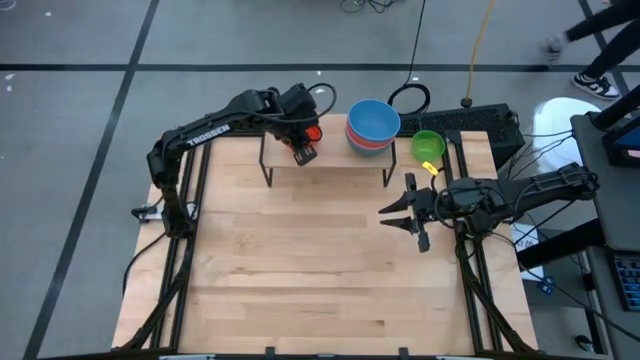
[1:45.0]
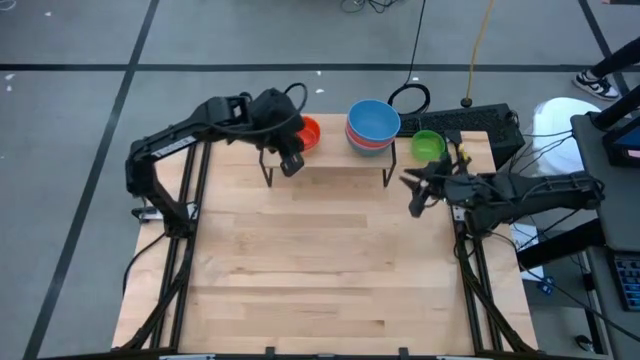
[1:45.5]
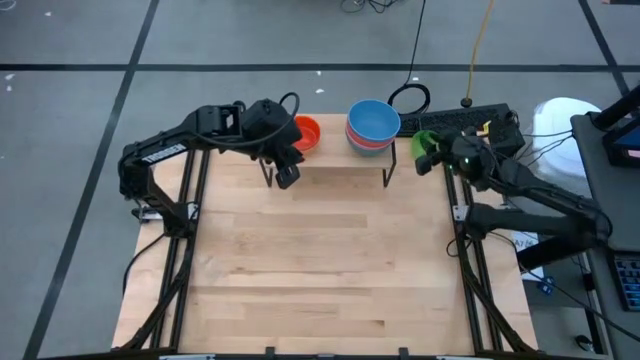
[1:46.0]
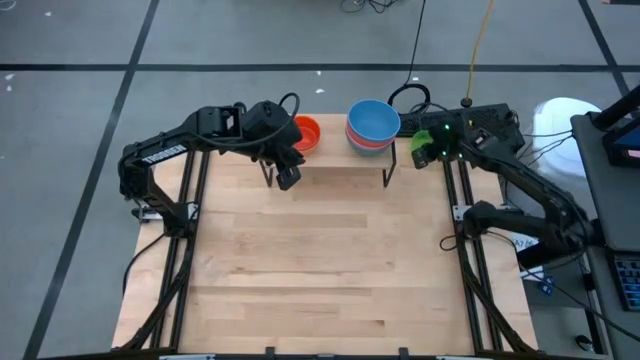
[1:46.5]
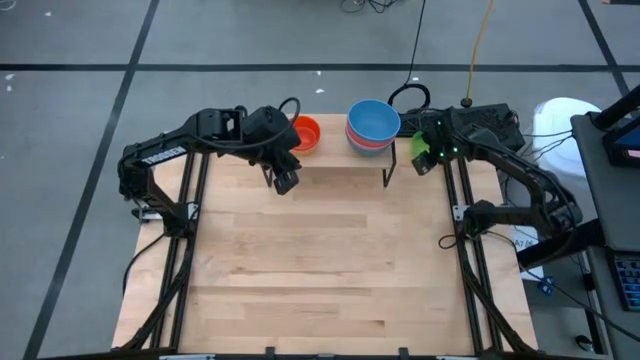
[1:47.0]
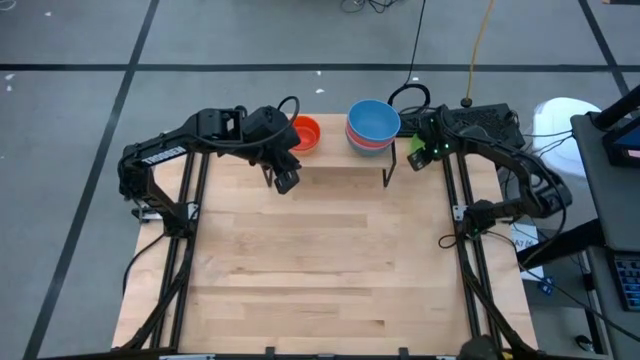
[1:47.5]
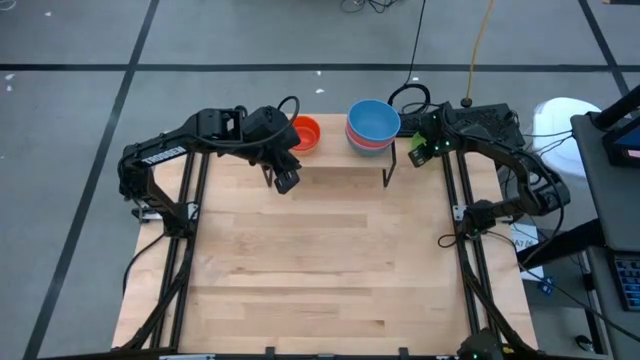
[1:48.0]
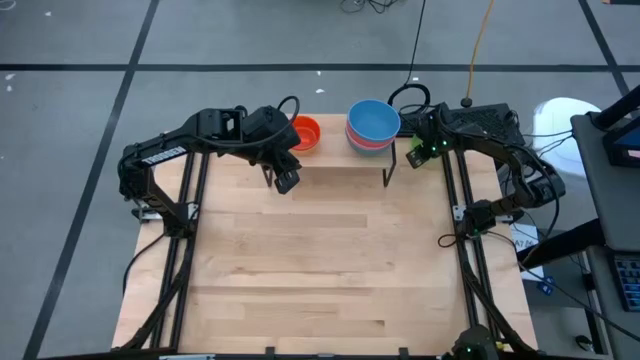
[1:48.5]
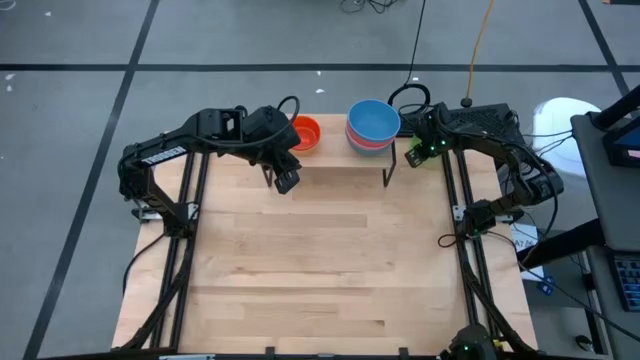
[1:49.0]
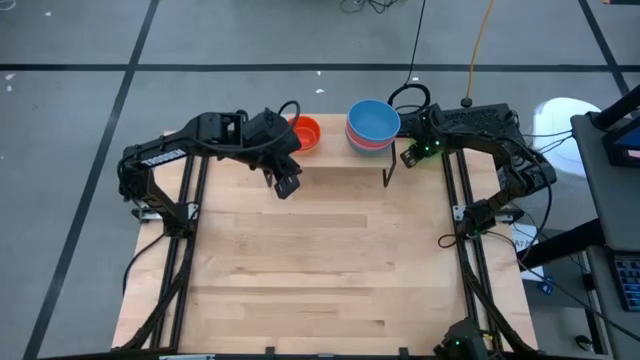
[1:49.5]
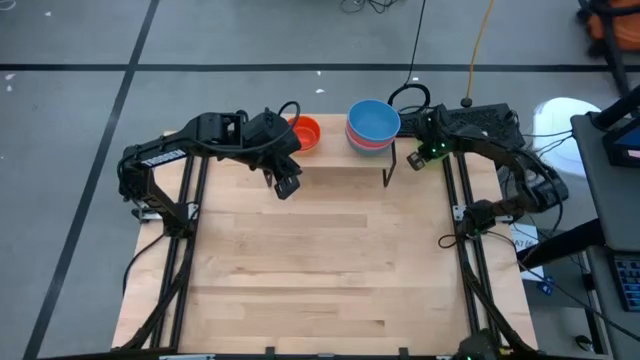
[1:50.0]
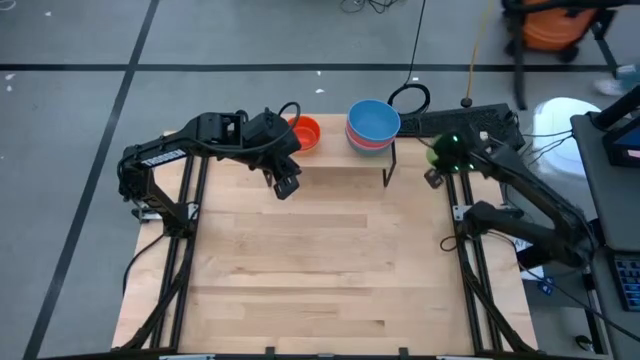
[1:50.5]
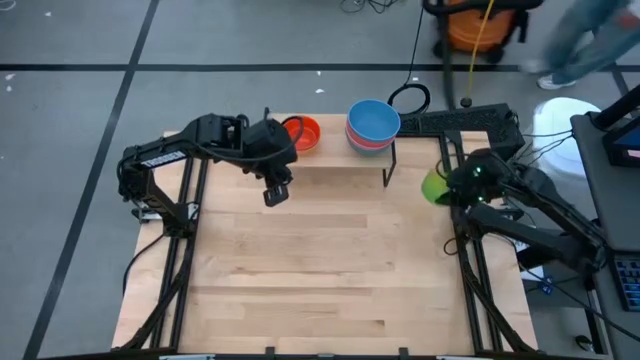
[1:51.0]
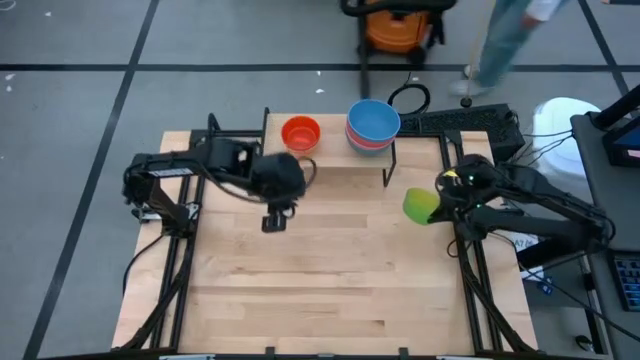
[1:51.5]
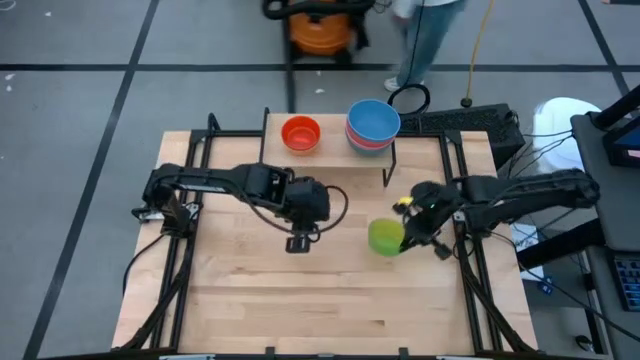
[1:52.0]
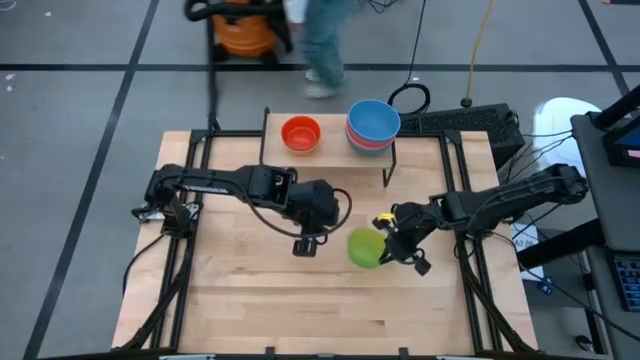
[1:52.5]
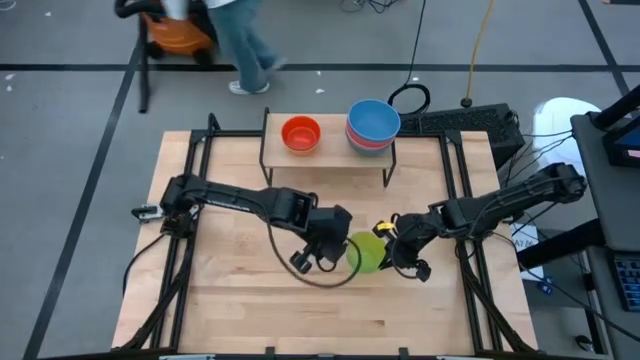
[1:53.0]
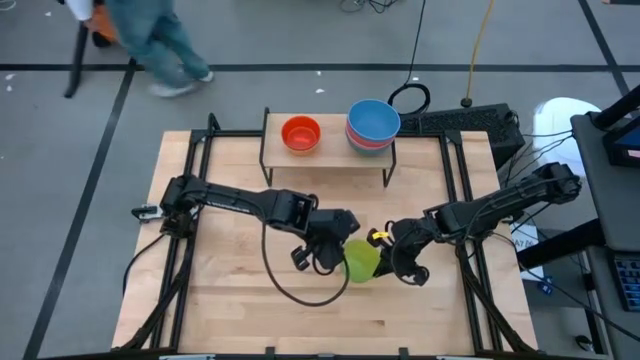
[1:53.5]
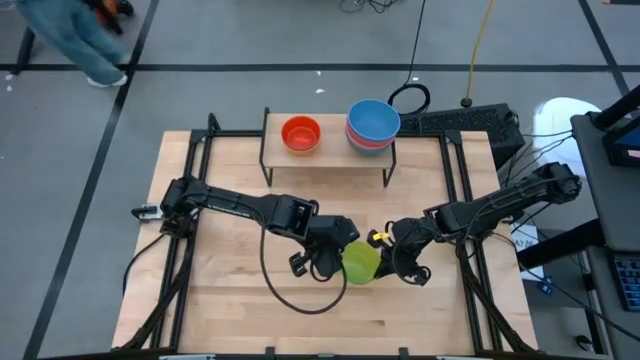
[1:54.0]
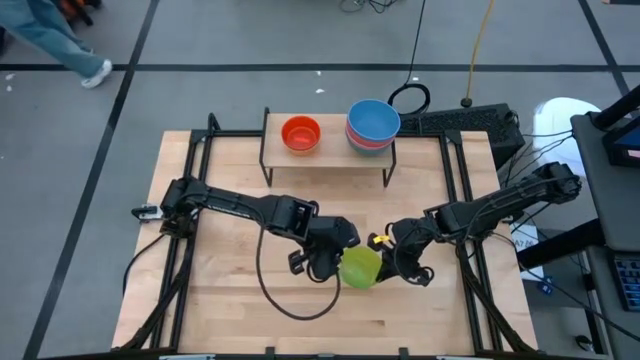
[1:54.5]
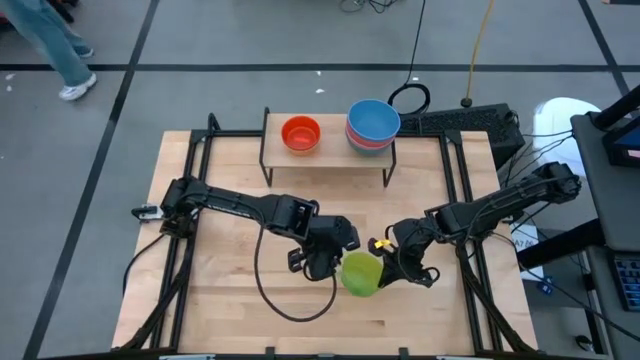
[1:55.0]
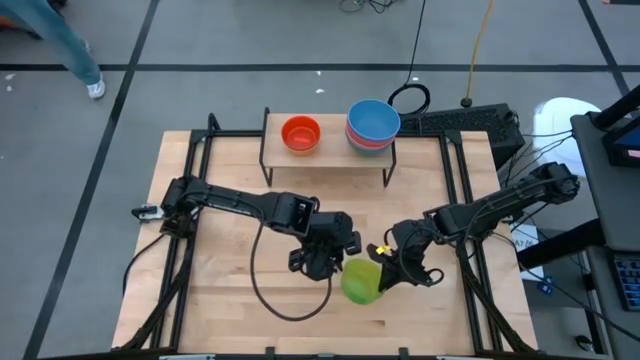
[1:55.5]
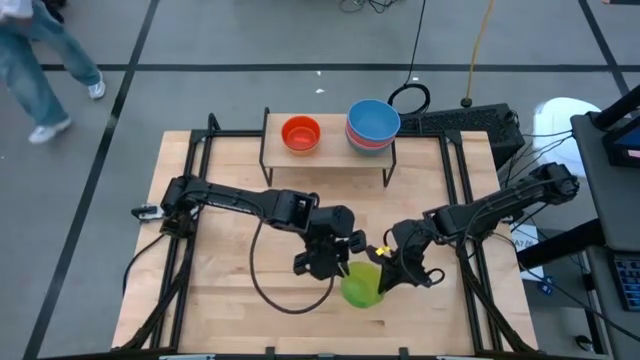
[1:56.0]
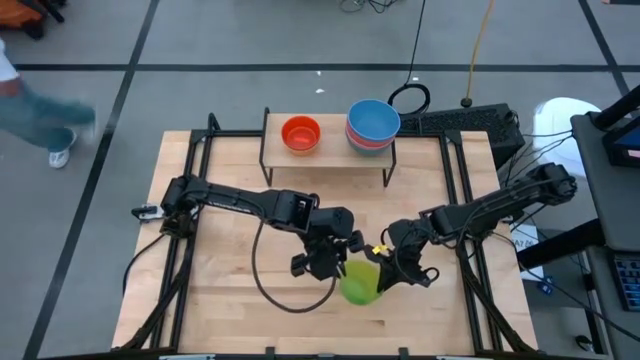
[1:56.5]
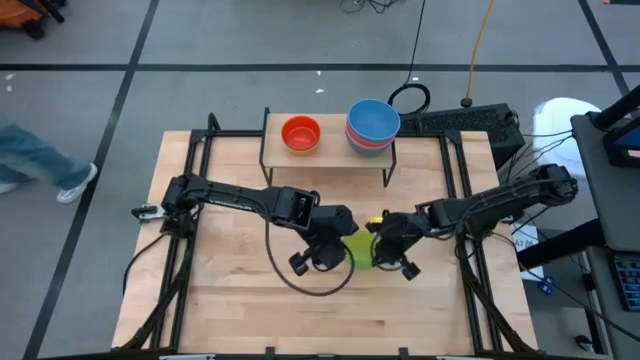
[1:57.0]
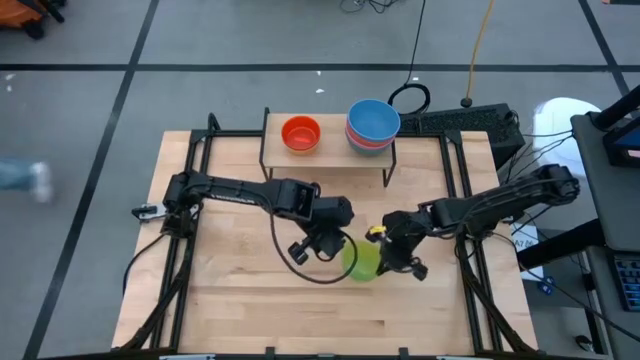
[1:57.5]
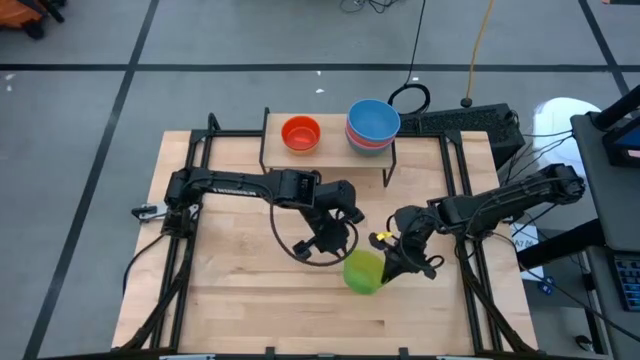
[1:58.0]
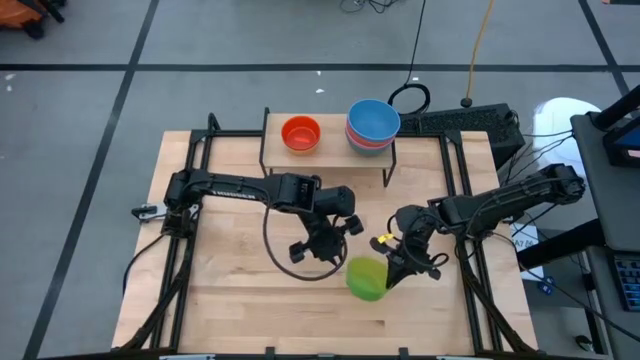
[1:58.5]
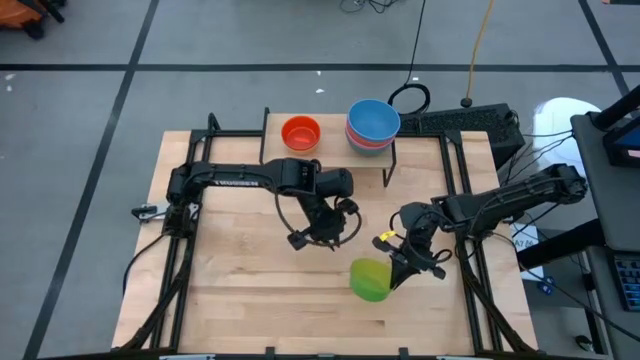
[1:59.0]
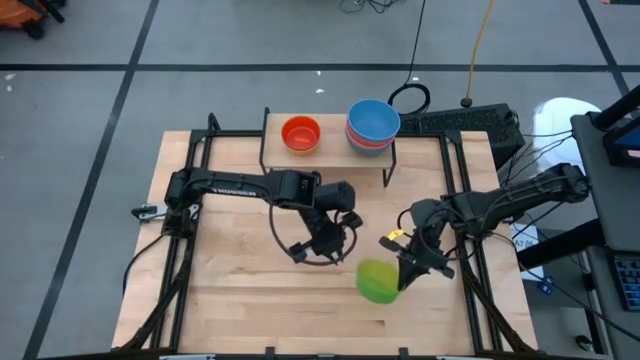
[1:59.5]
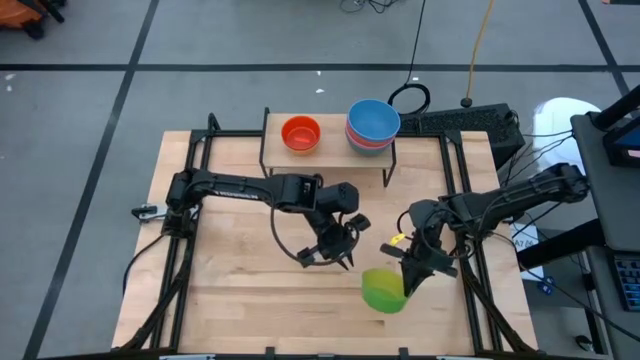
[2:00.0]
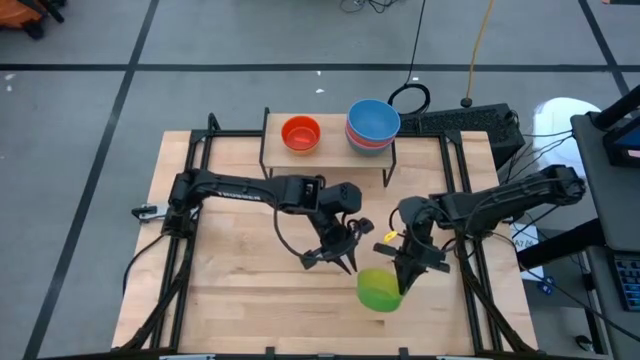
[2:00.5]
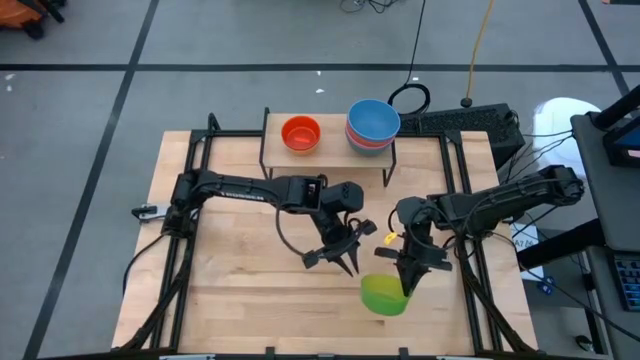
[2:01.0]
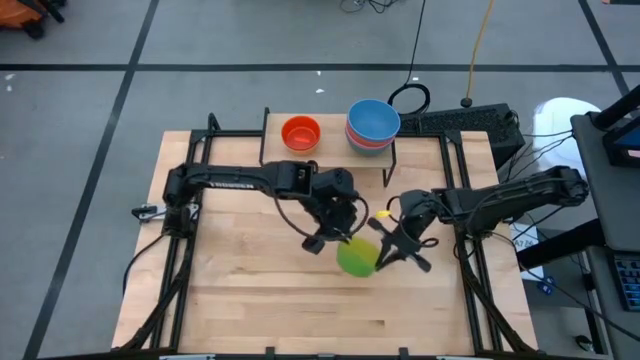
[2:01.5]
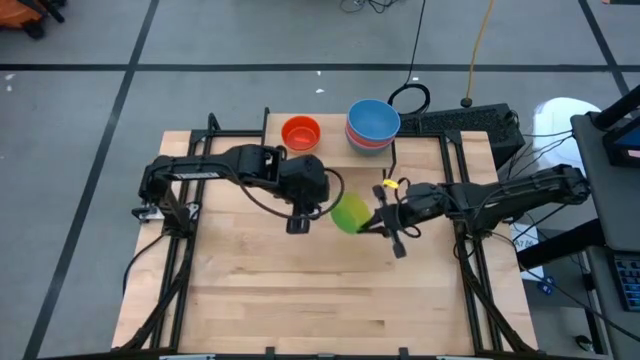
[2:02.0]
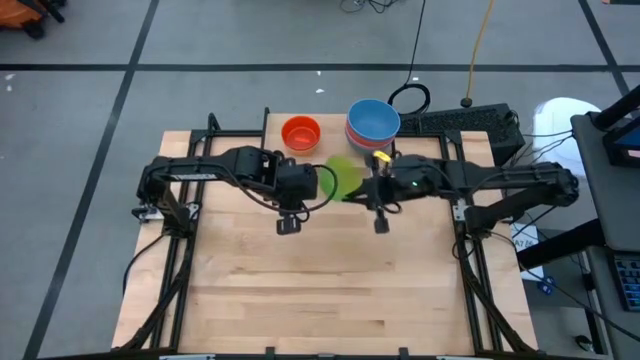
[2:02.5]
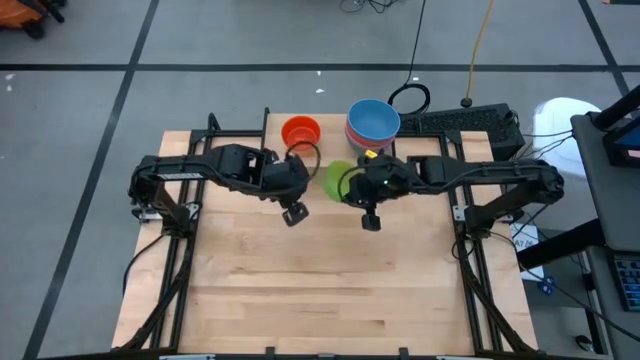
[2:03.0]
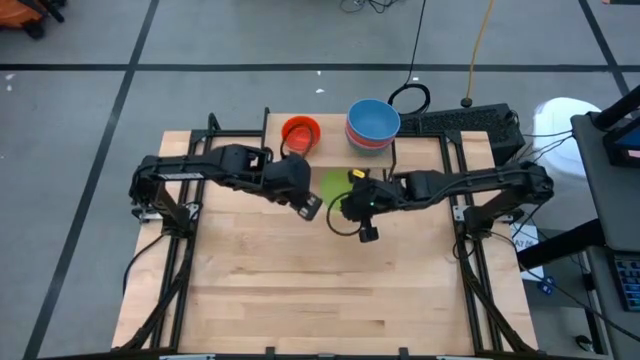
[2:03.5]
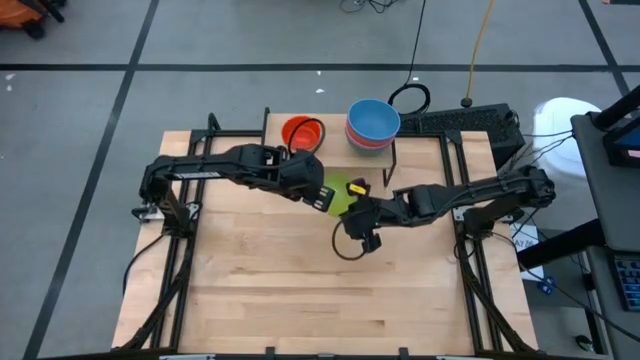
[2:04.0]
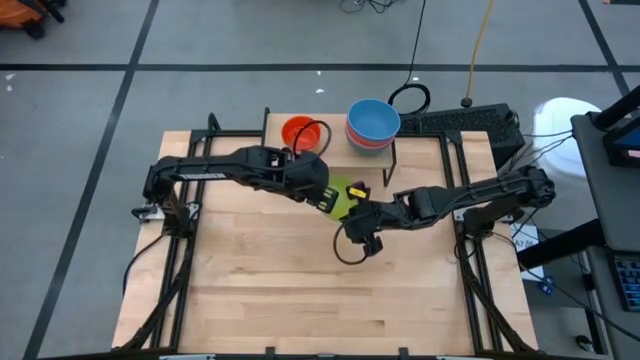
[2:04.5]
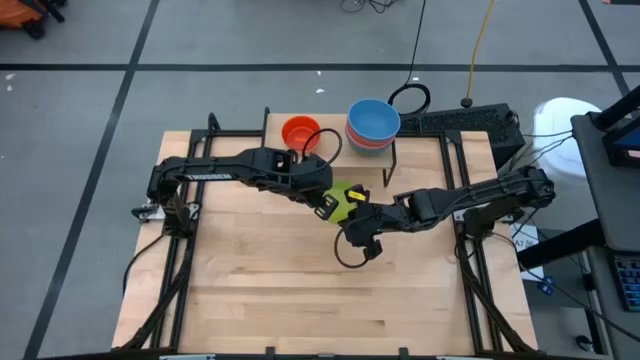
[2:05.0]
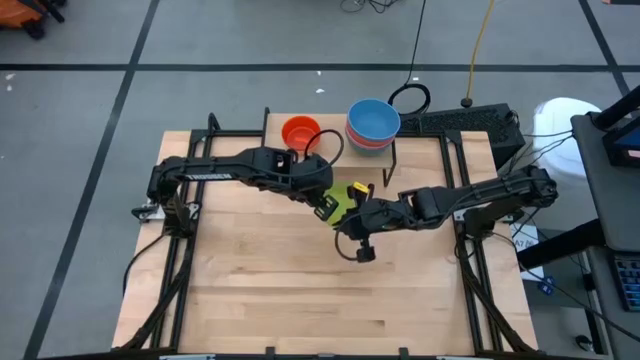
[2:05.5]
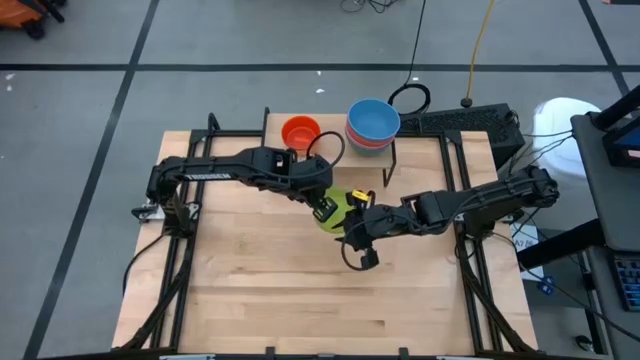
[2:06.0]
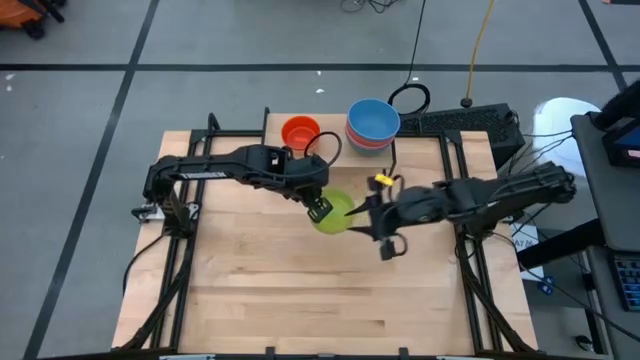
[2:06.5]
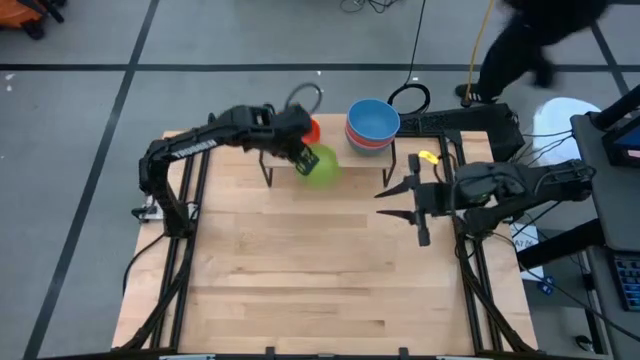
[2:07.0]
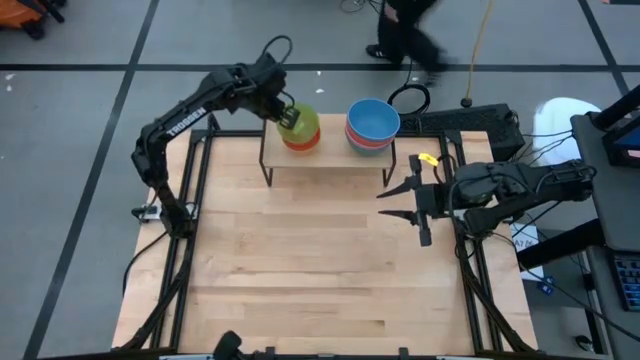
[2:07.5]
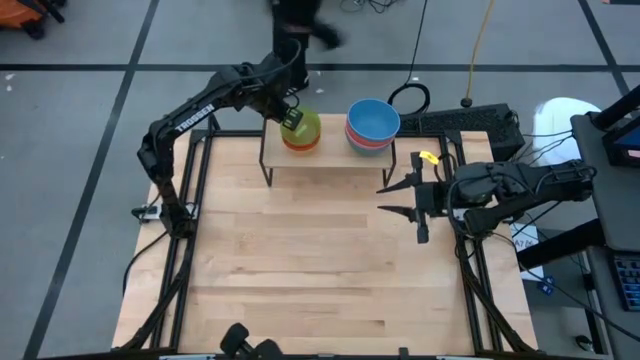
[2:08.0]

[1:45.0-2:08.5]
Task: Place and stack bowls onto a shelf
Stack the transparent green bowl on top of the transparent orange bowl on the shelf
